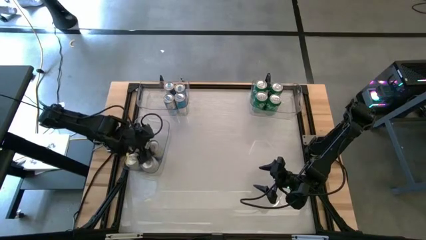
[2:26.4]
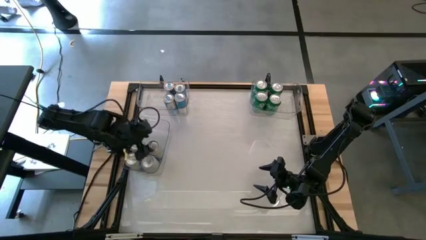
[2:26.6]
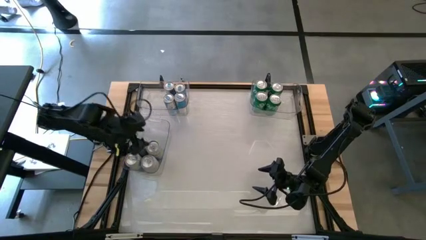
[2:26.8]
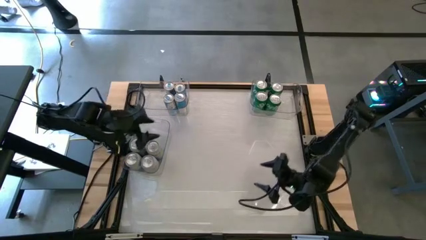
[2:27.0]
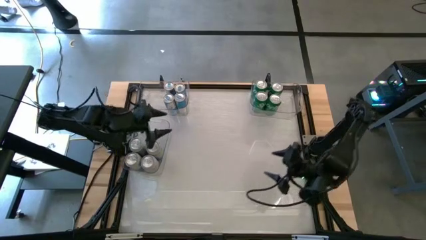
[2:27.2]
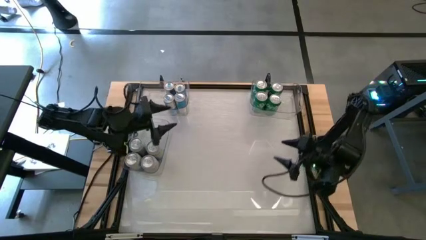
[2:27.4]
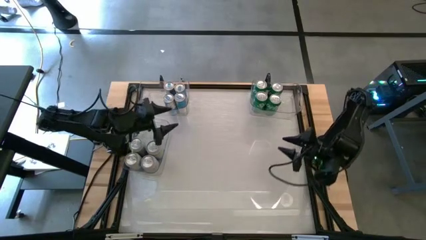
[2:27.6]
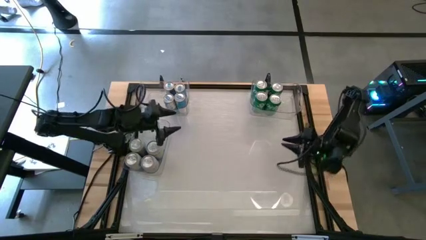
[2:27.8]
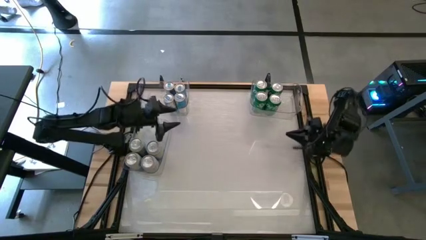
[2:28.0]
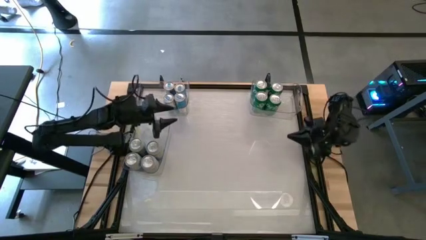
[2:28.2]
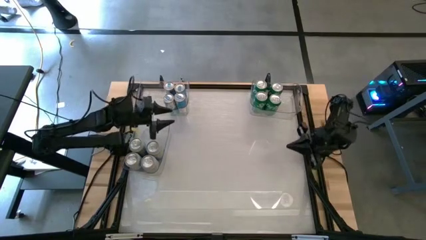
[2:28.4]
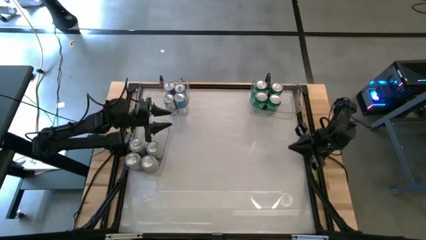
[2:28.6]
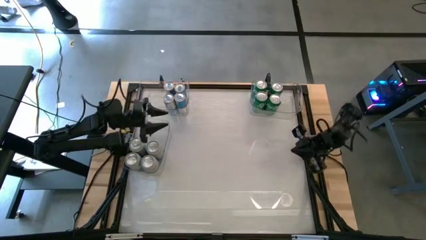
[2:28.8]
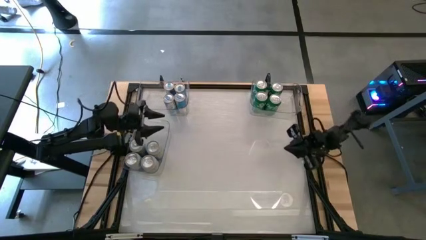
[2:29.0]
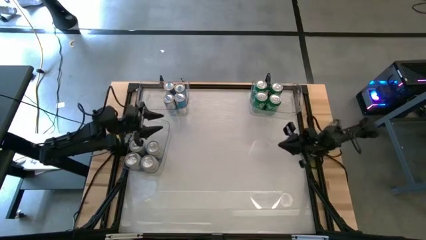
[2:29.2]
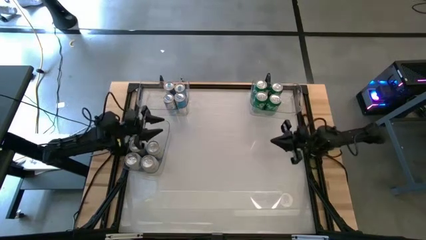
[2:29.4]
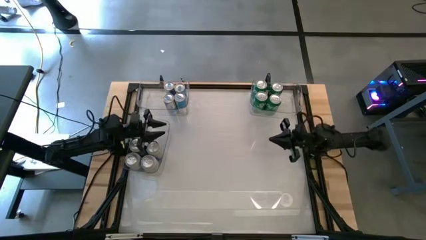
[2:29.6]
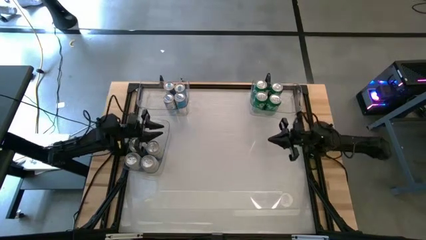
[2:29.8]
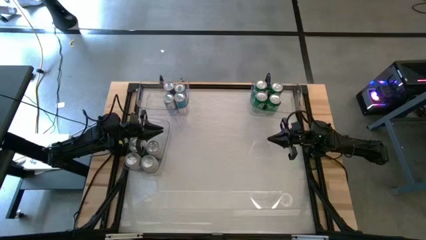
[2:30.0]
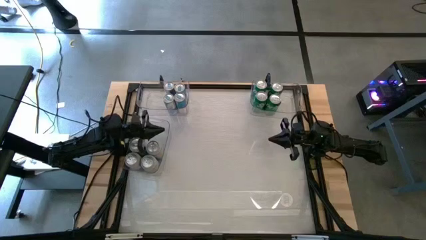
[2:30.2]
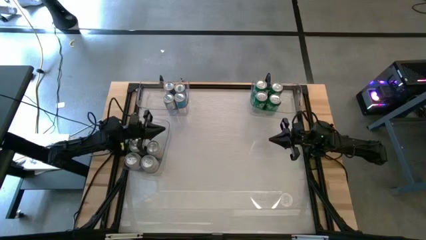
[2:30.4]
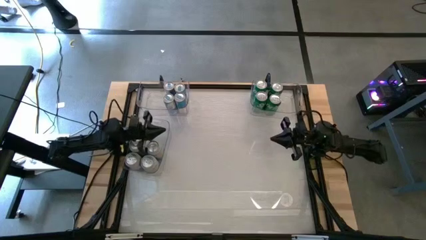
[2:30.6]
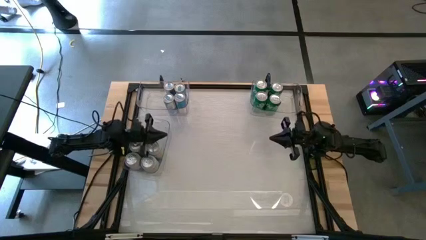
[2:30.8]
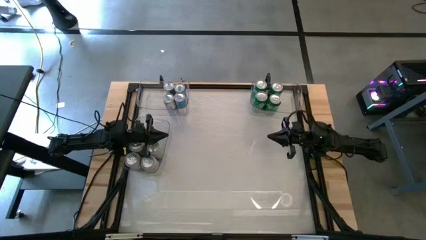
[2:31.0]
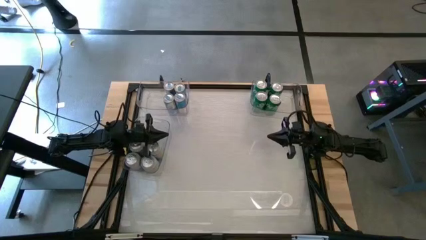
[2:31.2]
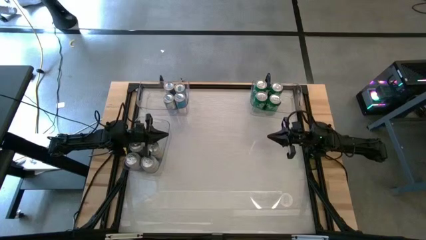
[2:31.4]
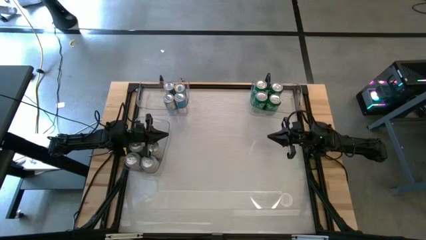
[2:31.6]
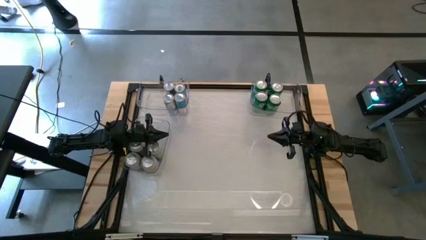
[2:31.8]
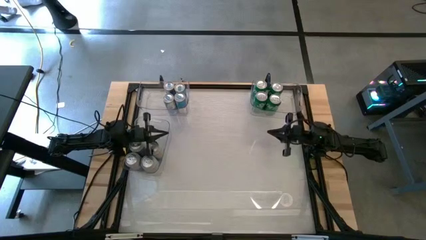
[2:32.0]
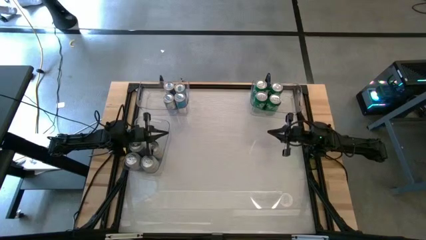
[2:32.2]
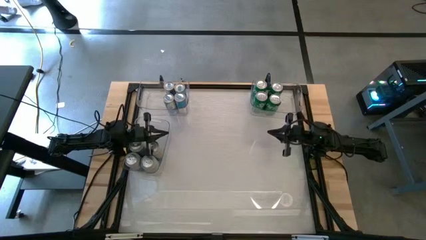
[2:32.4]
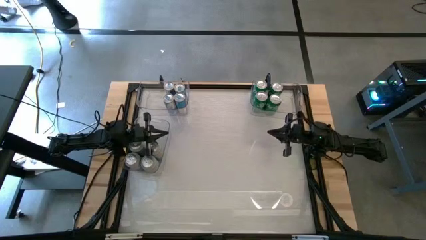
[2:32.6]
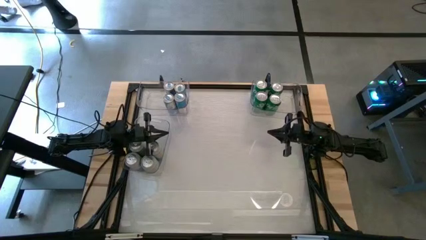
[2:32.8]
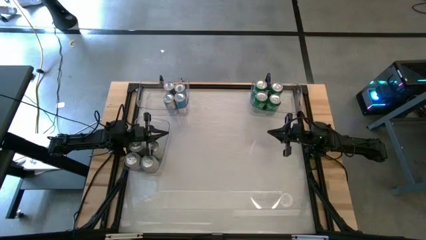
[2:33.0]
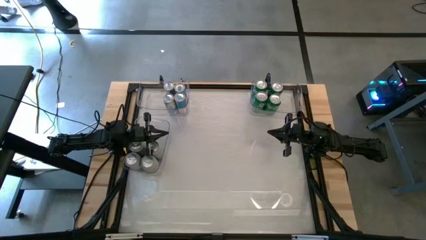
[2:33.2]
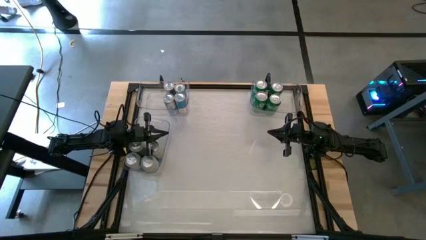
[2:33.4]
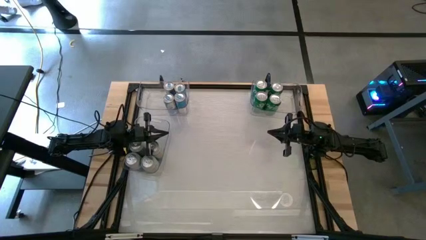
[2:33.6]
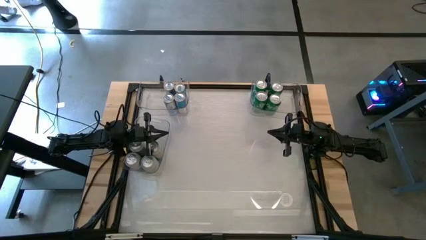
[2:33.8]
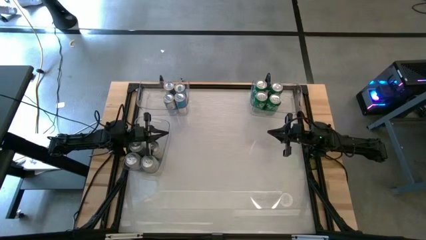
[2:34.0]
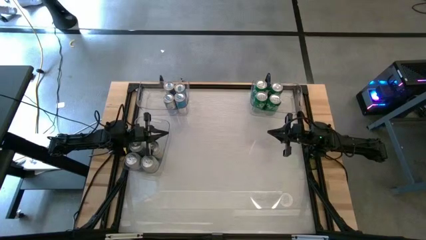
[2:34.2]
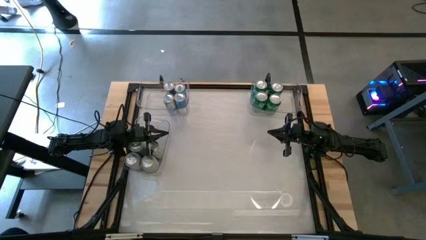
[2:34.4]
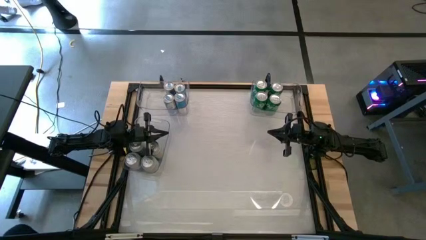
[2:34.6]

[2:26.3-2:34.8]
Task: Sort soda cans
Return to Home Position

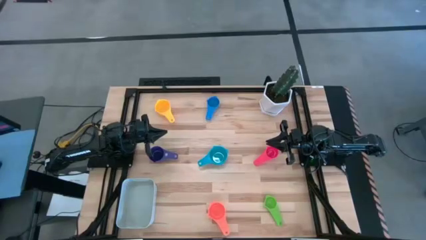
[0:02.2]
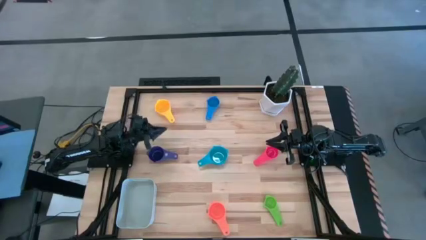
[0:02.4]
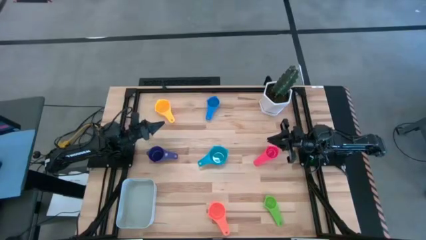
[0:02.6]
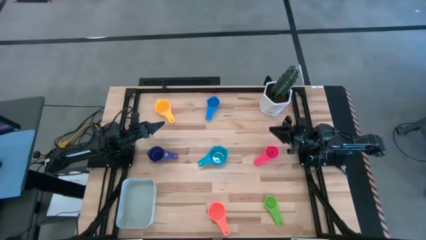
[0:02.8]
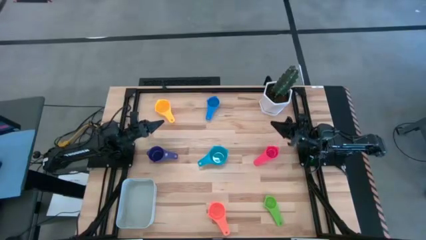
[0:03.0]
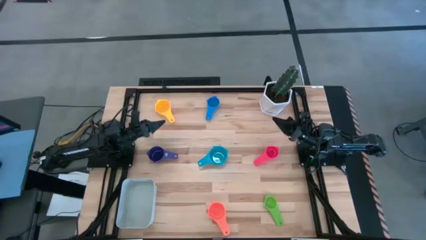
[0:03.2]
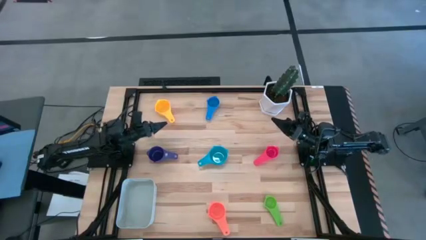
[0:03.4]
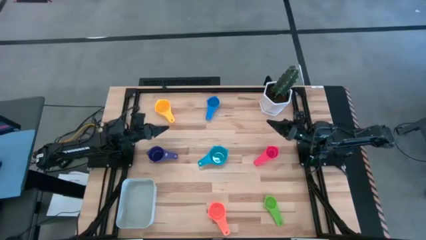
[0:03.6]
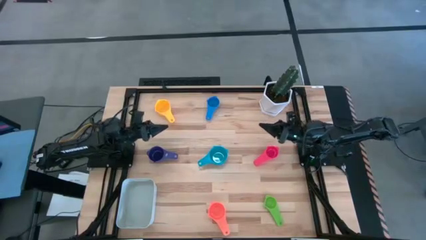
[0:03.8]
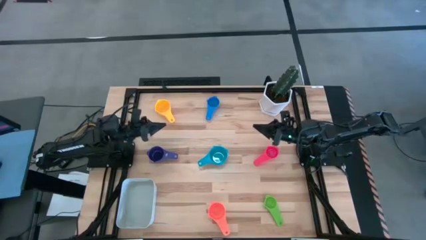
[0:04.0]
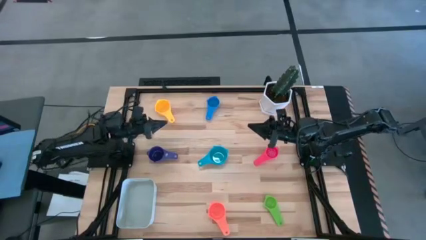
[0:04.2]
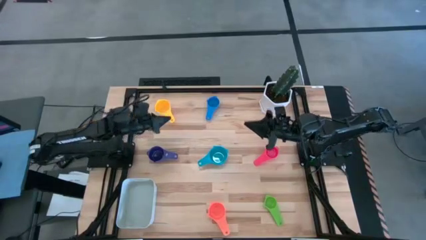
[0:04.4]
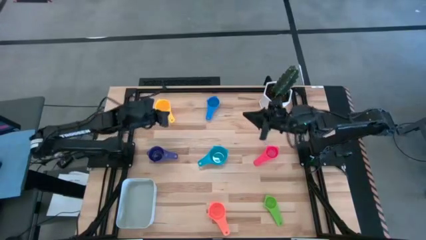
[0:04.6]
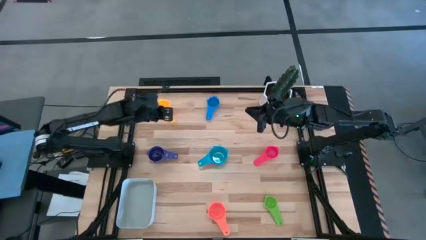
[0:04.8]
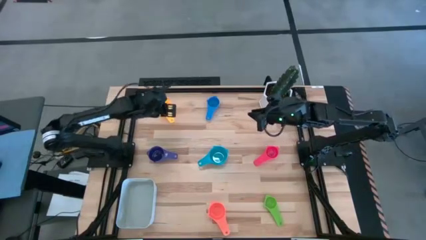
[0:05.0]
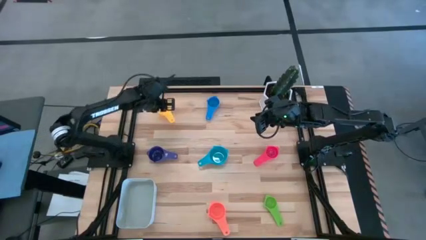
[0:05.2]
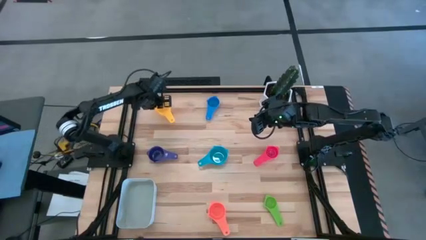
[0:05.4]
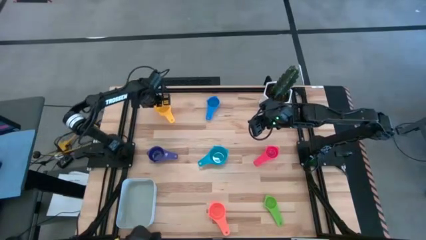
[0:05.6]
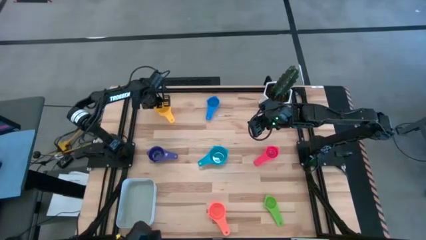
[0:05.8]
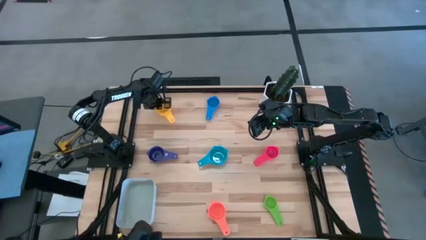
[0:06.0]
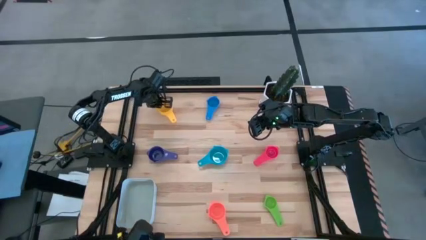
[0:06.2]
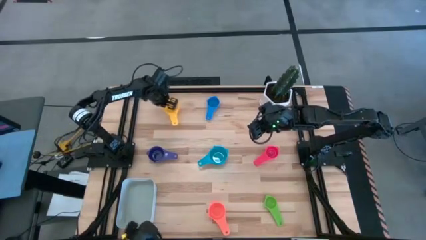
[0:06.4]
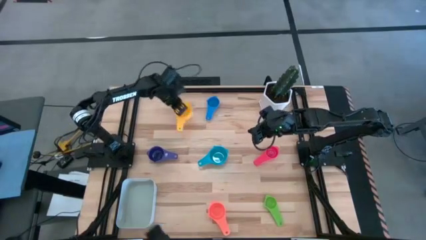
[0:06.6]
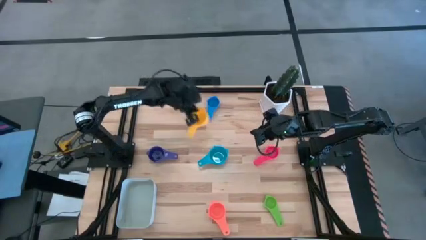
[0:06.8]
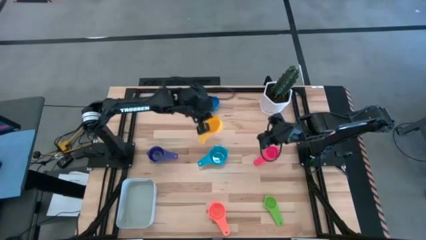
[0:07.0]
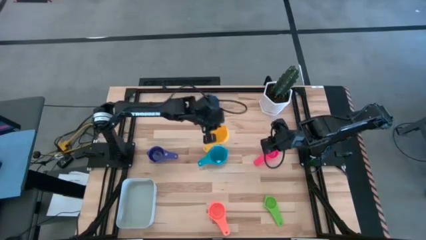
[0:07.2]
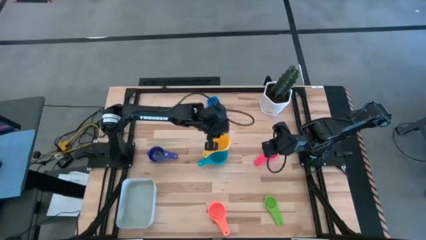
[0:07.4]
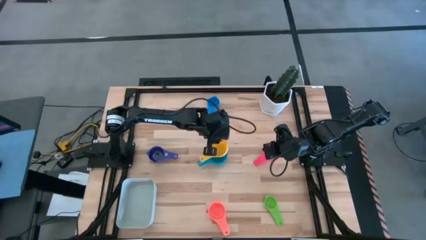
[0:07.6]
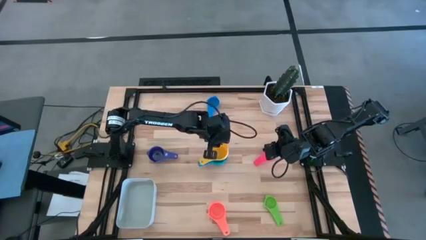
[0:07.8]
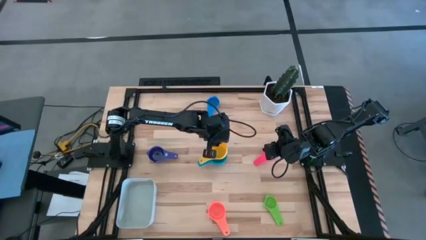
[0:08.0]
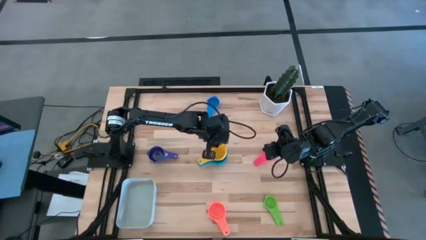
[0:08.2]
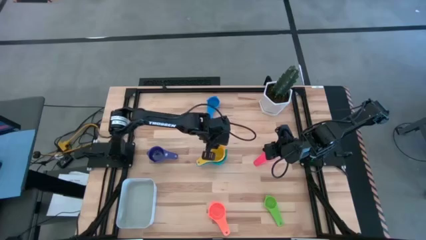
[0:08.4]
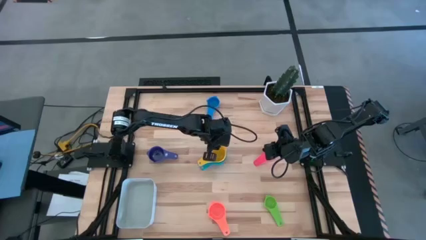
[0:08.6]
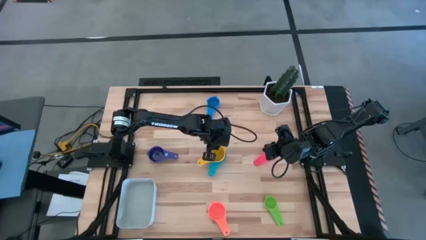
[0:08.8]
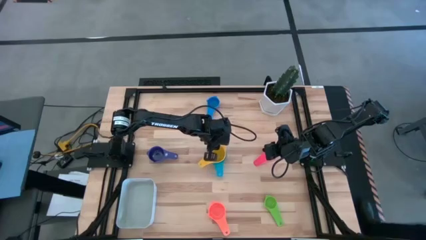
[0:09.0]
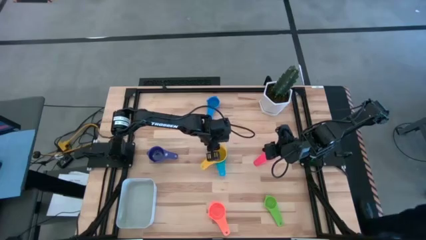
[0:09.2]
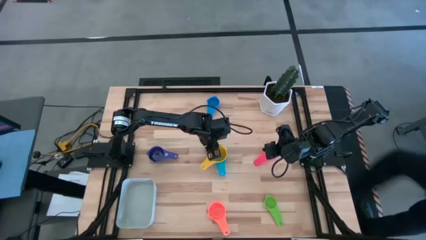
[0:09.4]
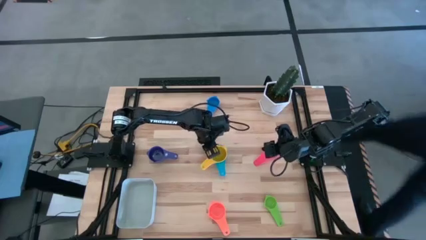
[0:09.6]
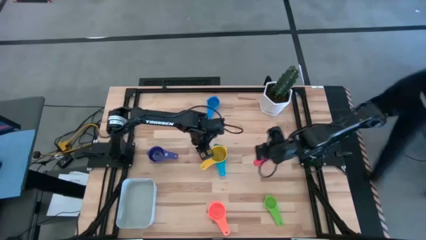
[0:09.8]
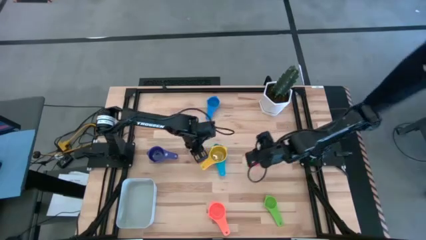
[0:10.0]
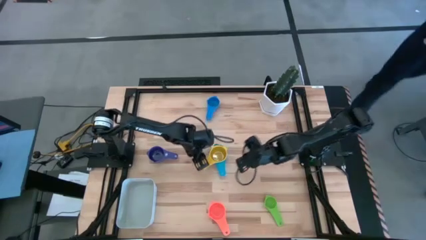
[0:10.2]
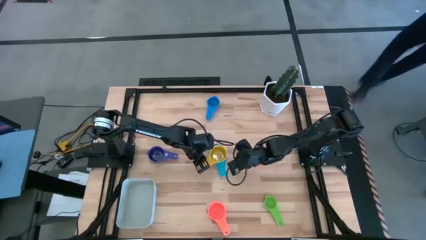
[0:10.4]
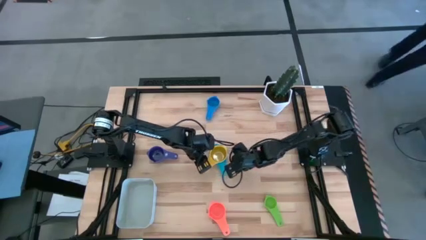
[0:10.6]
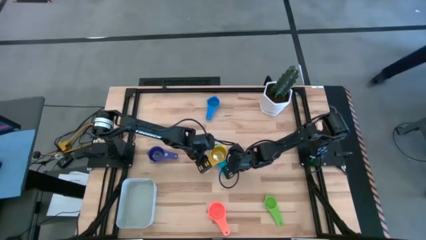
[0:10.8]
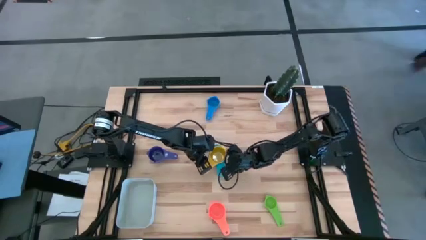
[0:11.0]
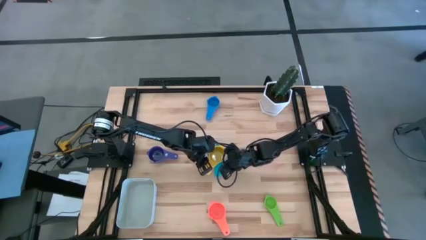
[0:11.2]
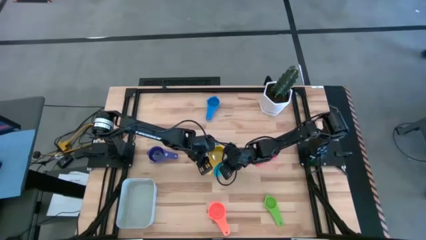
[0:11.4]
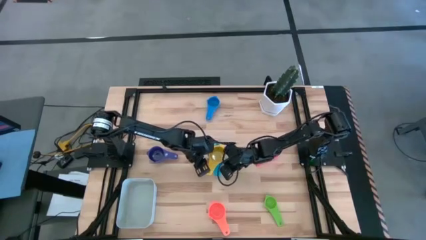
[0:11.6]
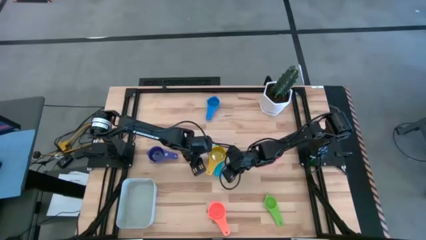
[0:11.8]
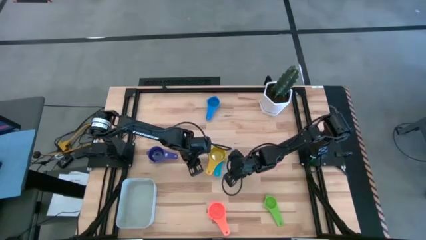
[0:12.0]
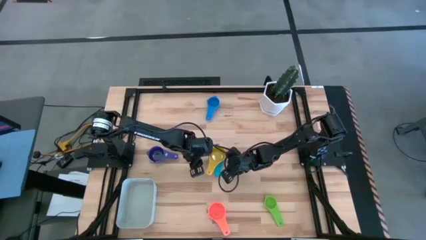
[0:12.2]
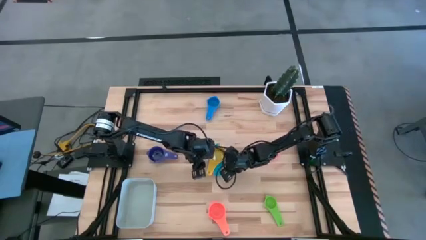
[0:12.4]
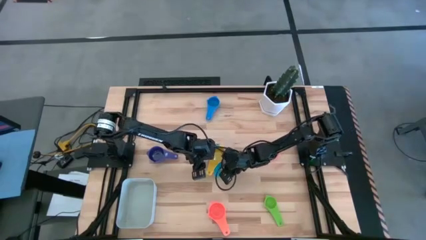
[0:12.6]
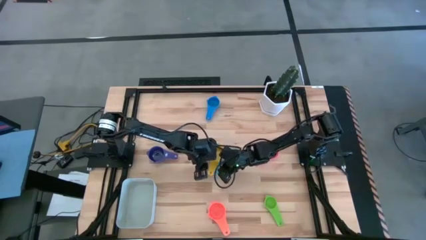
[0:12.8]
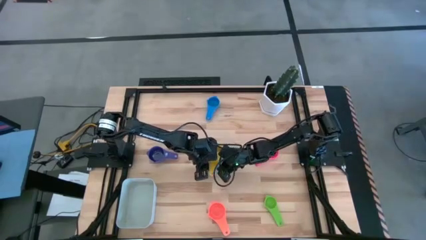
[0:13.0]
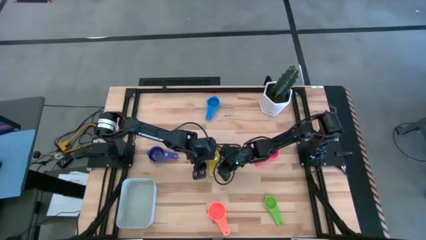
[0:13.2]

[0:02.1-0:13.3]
Task: Nest measuring cups in basket
Stack the yellow measuring cup on top of the light blue measuring cup
